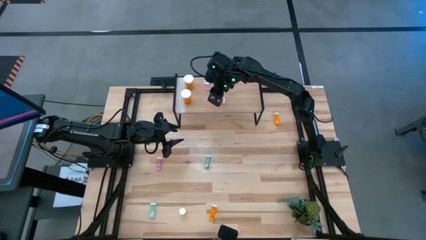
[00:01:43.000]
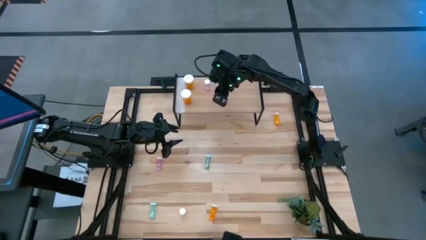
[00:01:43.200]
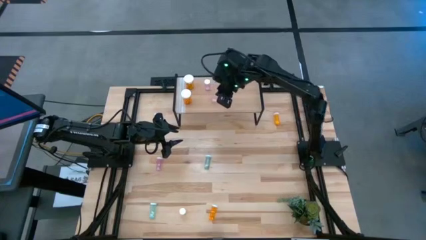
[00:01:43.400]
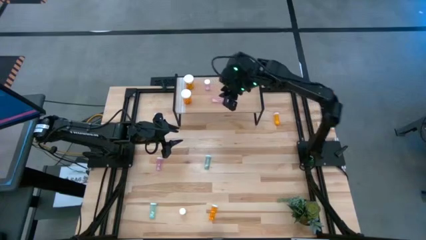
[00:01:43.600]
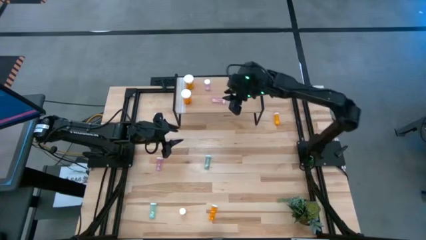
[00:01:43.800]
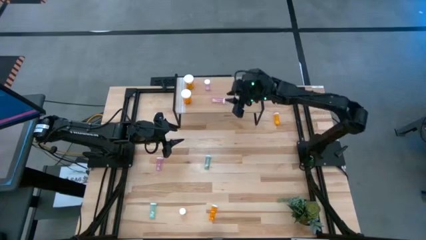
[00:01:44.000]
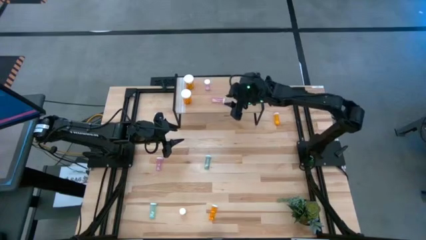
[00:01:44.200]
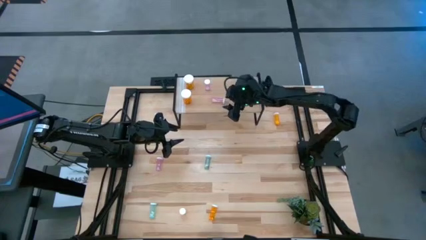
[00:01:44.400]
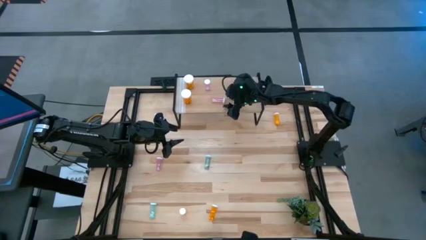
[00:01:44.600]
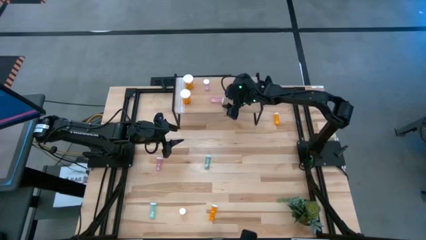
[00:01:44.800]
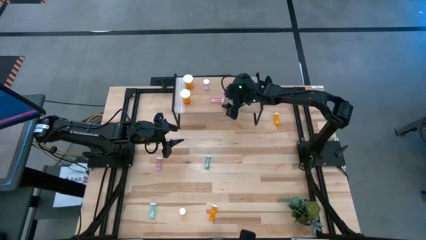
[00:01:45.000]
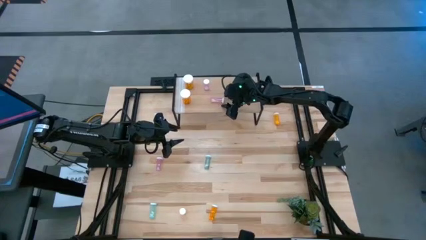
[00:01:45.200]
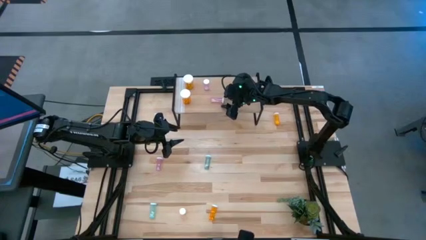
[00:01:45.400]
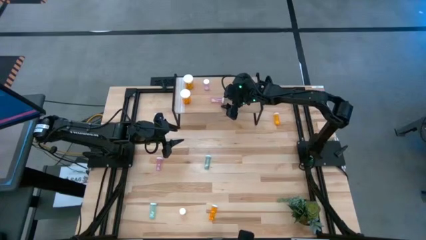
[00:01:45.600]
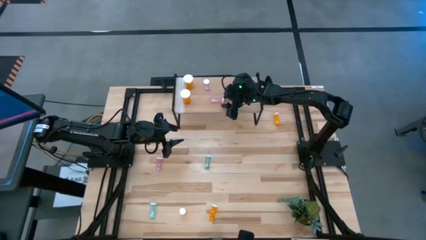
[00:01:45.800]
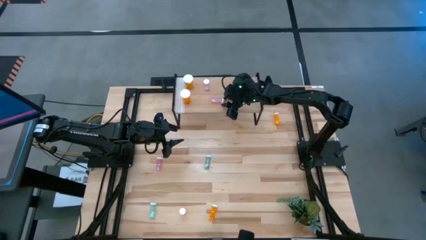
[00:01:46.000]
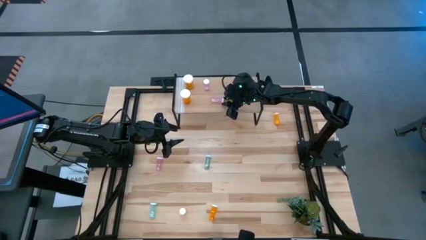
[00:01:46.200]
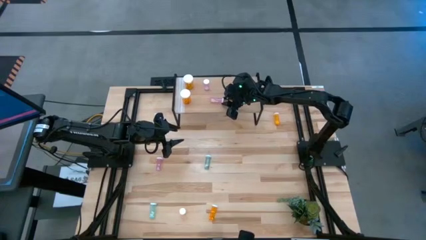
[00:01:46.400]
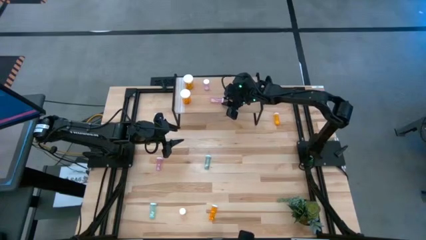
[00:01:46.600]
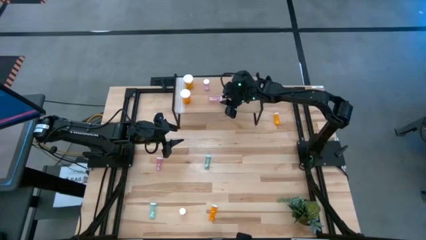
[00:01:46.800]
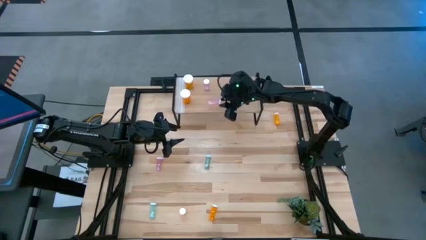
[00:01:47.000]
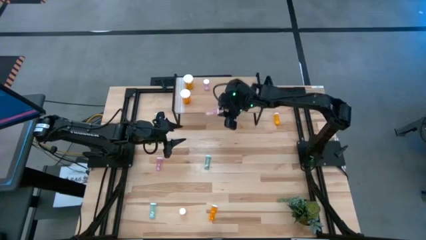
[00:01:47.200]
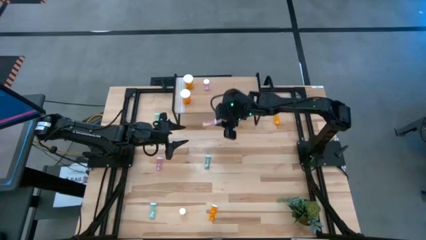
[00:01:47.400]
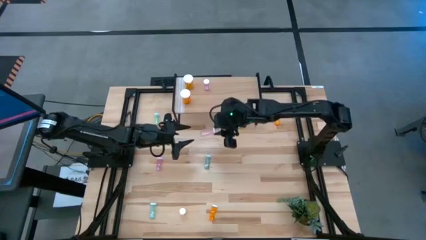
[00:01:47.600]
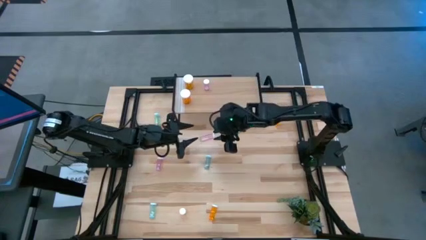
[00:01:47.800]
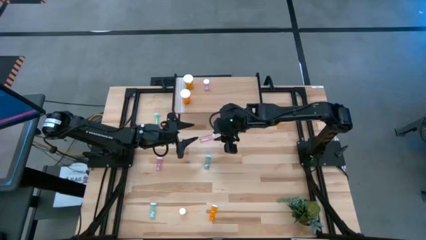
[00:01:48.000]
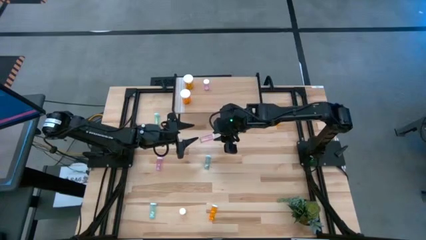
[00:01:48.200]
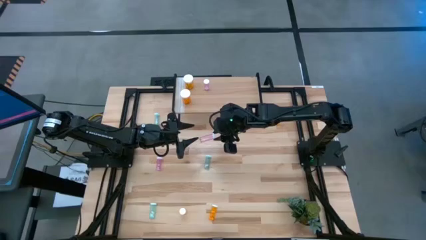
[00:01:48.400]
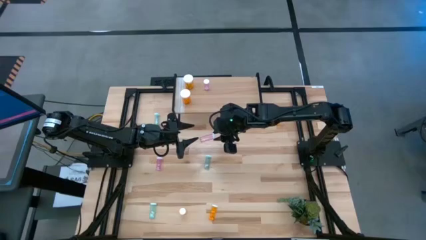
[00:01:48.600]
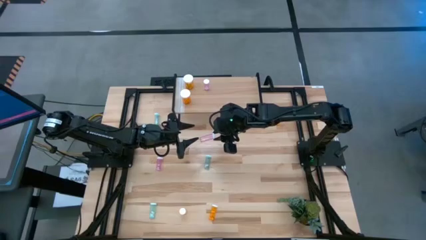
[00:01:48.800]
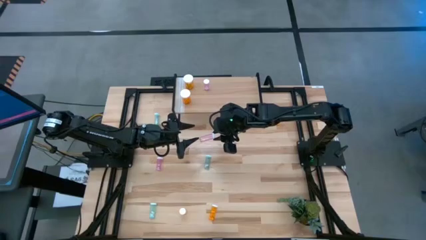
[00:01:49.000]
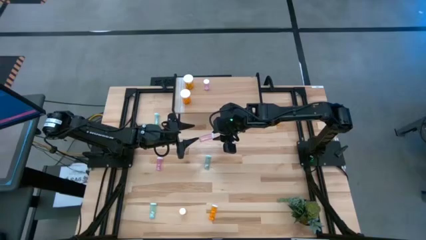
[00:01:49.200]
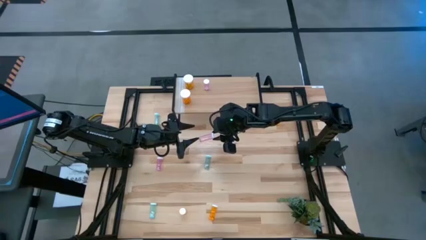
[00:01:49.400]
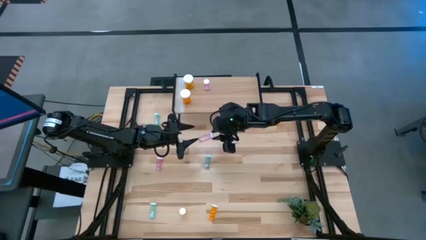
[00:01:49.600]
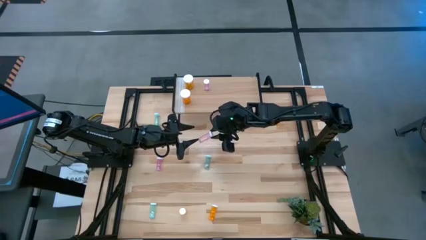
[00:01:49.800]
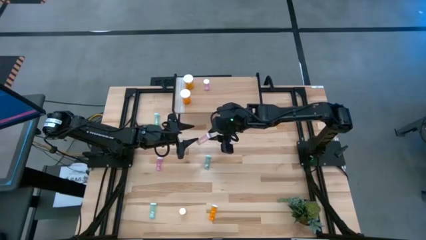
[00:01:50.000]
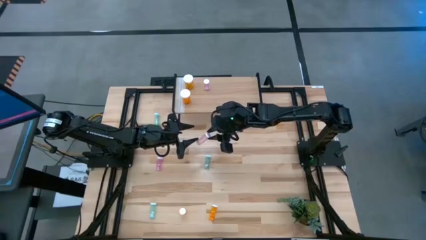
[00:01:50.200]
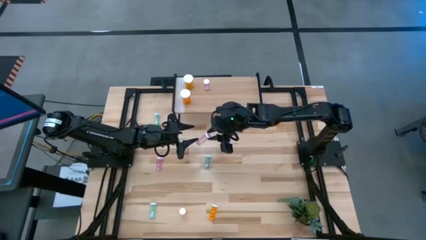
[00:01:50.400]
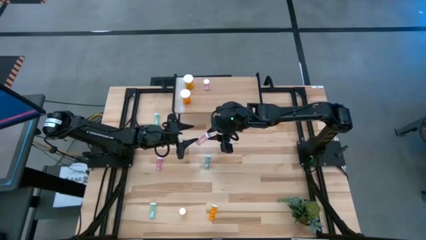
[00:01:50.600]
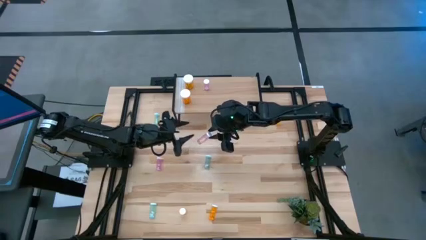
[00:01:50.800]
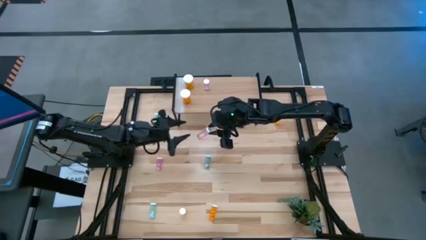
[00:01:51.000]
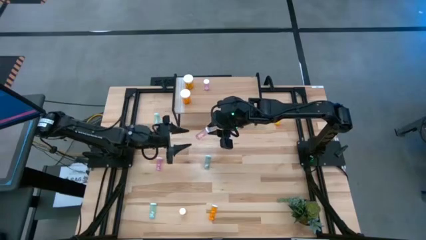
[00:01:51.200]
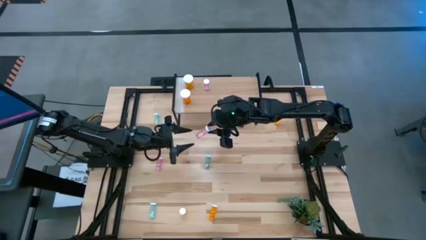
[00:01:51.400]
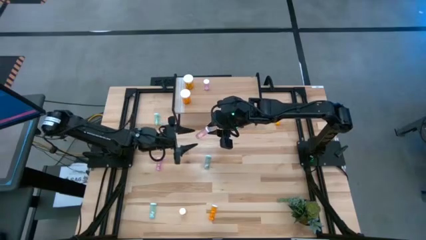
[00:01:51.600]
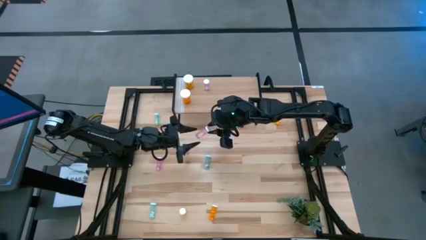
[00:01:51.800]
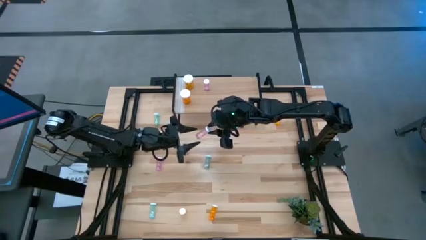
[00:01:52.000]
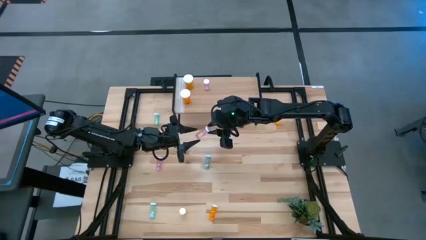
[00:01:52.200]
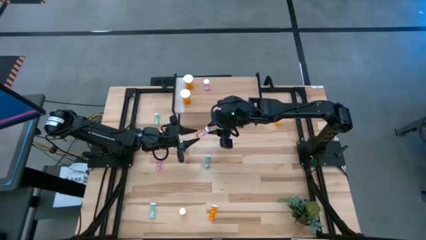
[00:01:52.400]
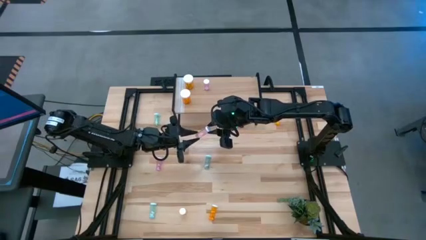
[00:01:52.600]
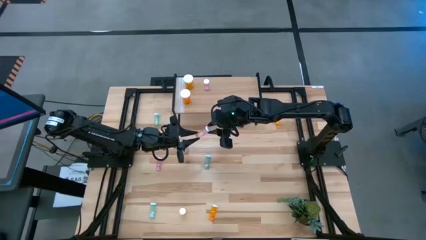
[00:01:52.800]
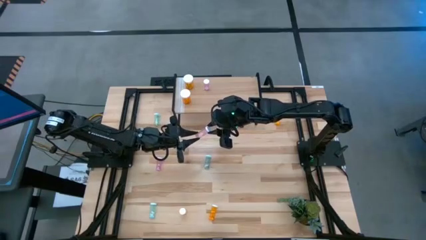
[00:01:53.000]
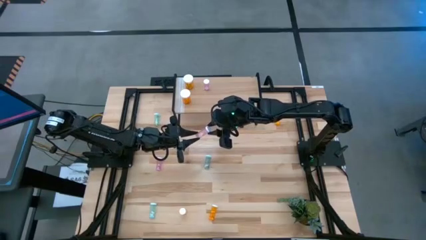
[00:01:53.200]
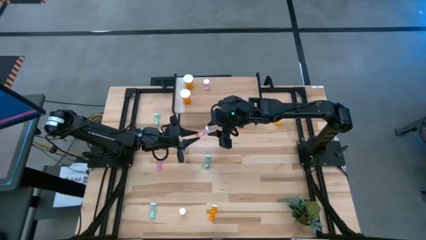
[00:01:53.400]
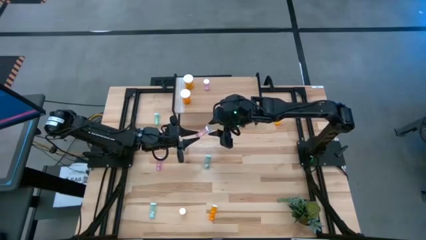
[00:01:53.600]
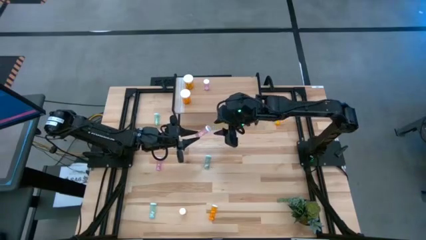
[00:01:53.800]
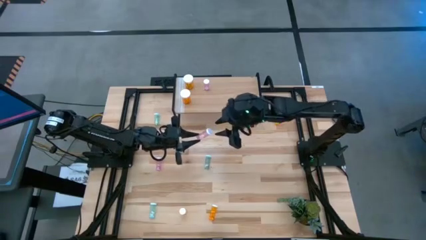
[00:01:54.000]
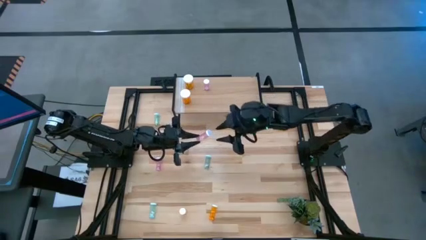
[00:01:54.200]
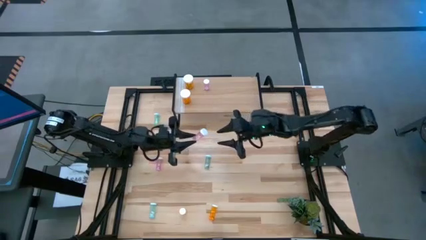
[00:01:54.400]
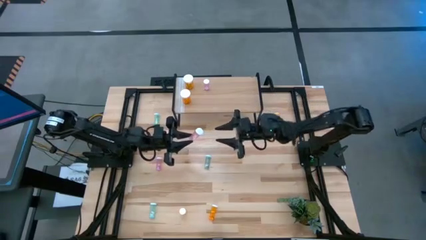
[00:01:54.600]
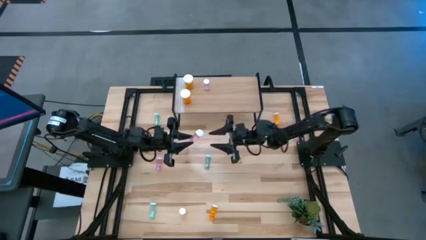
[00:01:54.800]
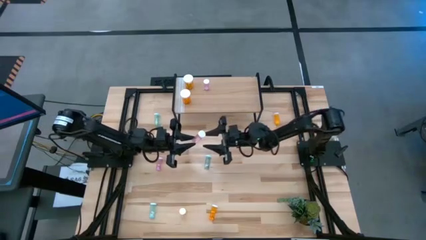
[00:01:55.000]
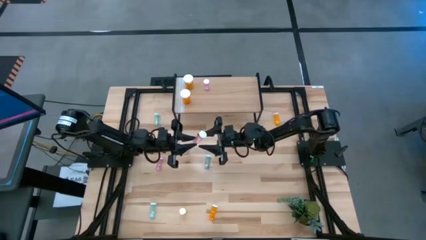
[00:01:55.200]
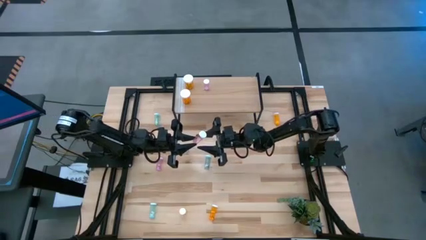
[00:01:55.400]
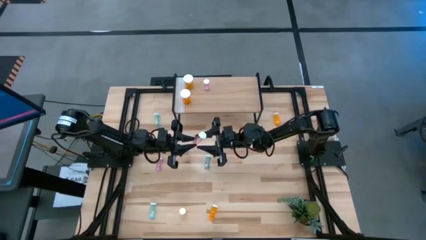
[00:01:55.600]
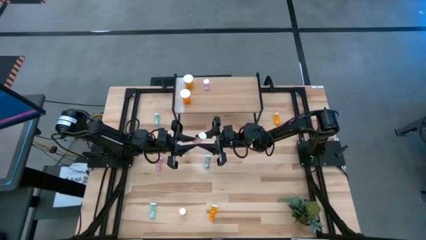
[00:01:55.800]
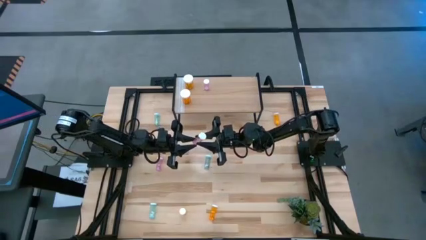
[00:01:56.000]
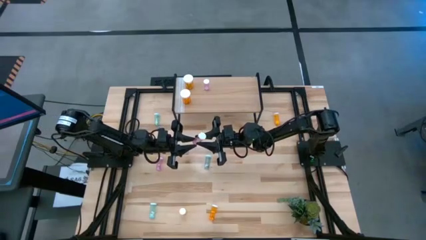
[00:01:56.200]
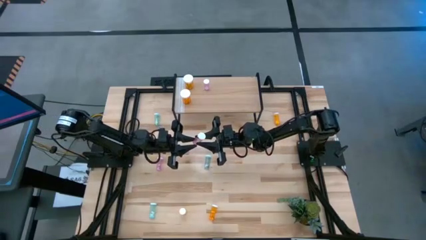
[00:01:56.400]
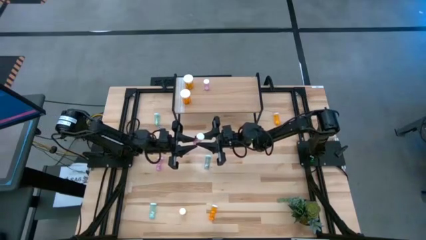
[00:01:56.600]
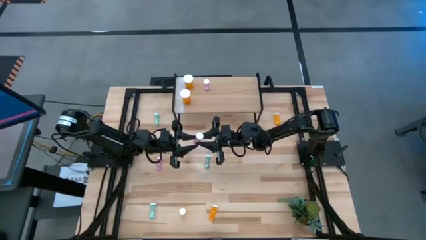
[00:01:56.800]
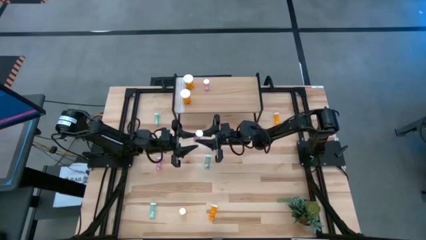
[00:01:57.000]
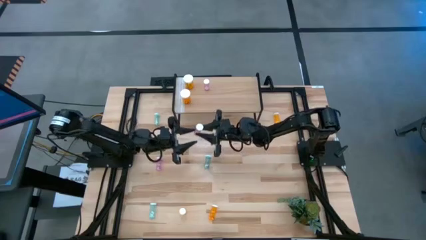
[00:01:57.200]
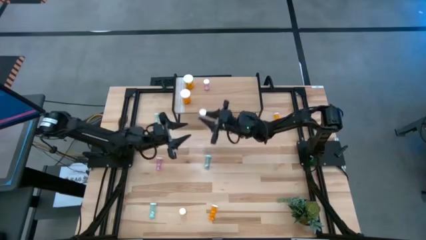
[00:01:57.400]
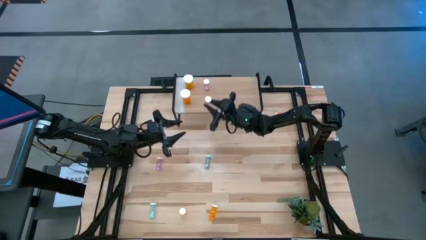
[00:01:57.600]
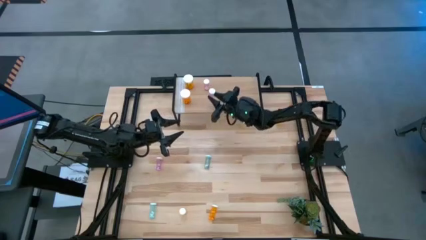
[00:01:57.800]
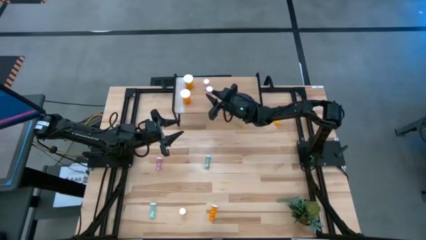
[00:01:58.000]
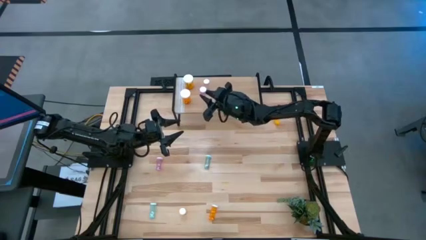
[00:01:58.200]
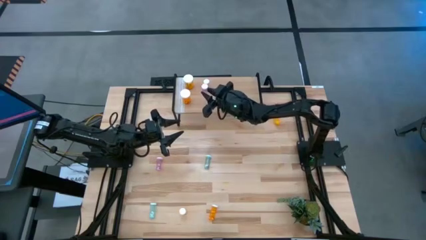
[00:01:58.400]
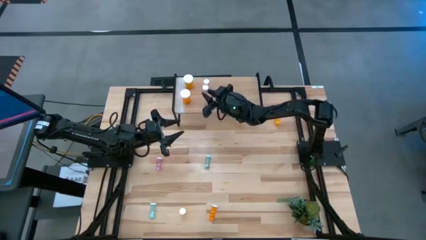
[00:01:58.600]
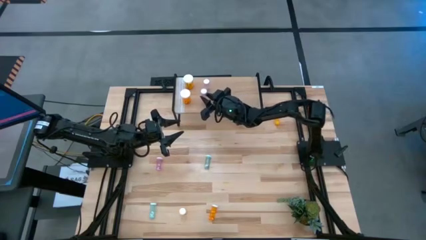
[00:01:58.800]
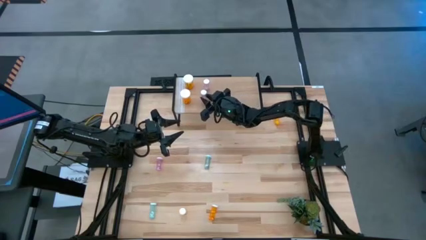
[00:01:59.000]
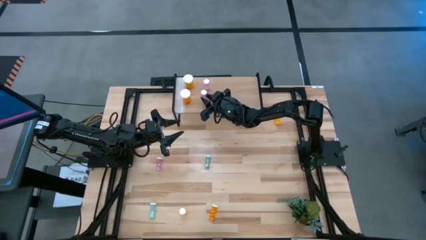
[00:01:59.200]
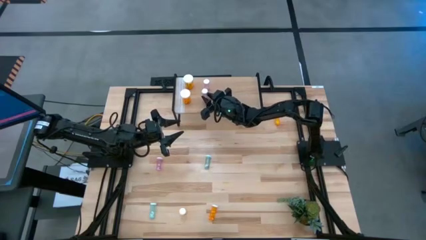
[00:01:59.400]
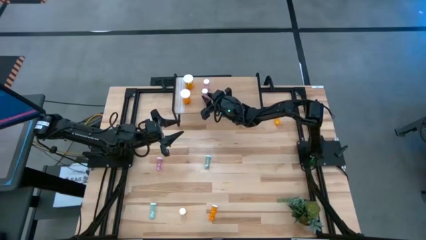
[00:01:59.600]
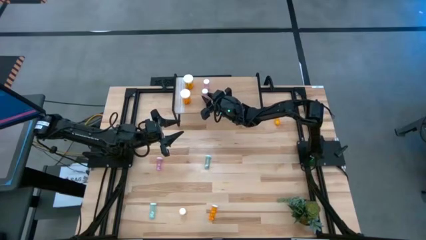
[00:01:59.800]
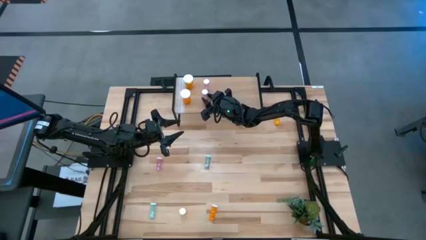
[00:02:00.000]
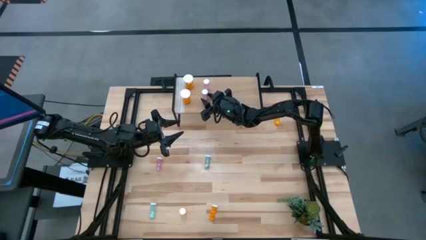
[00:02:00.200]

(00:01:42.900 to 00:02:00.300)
Task: Pick and place medicine bottles onto shelf by color
Put the bottom small pink pill bottle aligned with the other small pink bottle on the shelf
